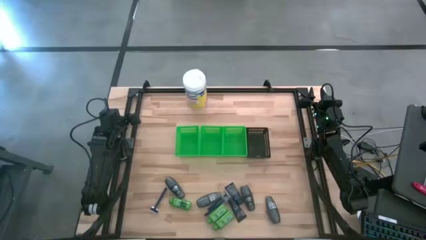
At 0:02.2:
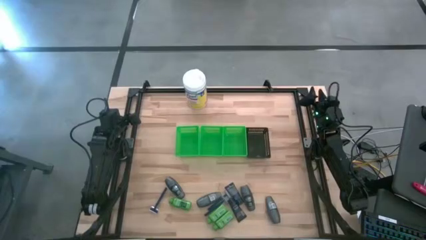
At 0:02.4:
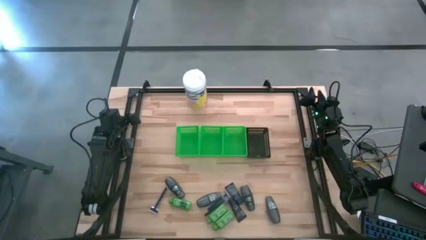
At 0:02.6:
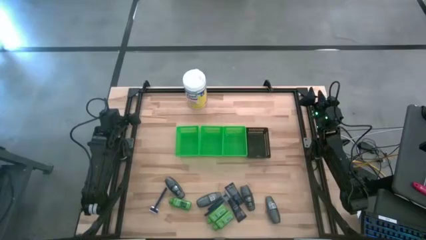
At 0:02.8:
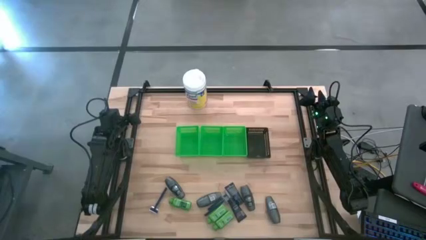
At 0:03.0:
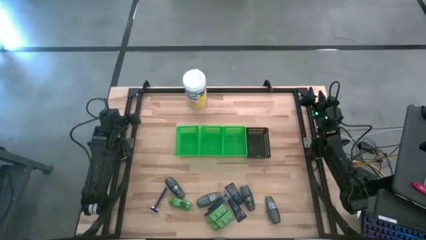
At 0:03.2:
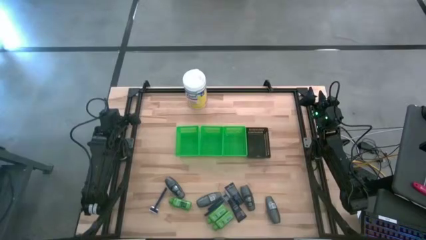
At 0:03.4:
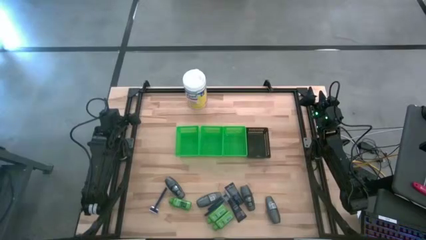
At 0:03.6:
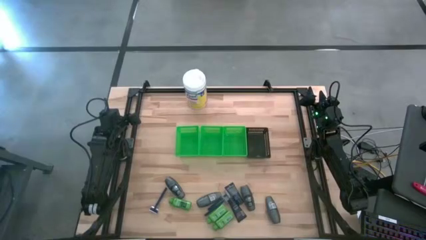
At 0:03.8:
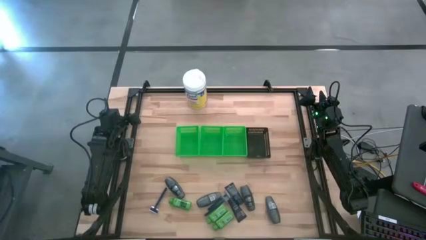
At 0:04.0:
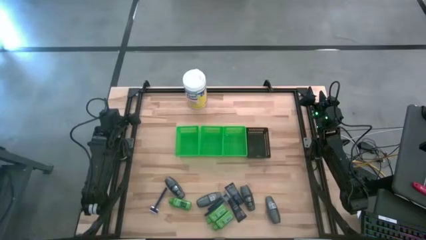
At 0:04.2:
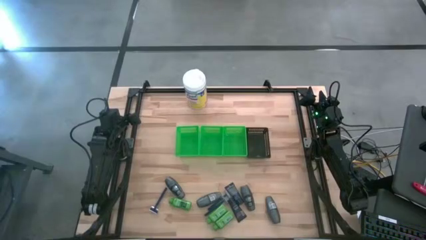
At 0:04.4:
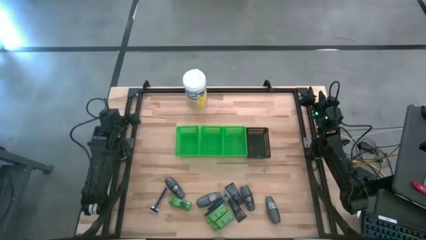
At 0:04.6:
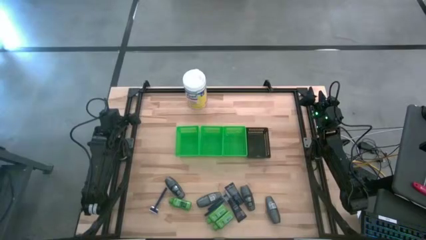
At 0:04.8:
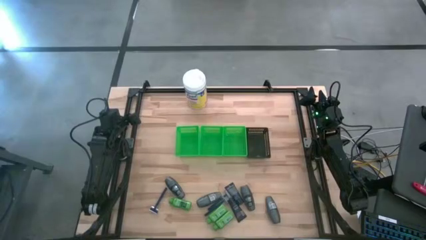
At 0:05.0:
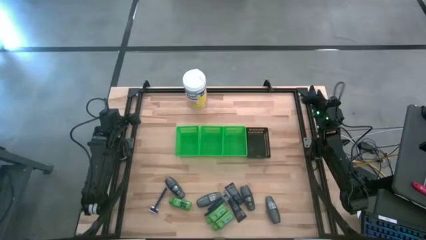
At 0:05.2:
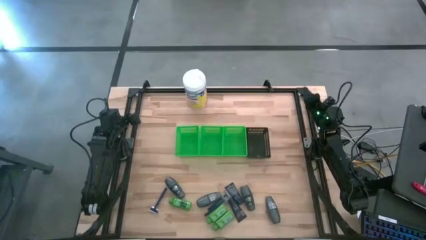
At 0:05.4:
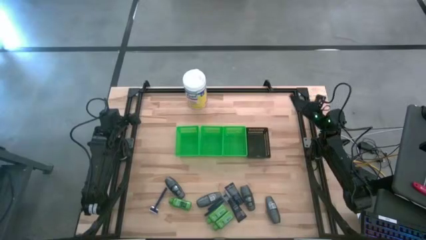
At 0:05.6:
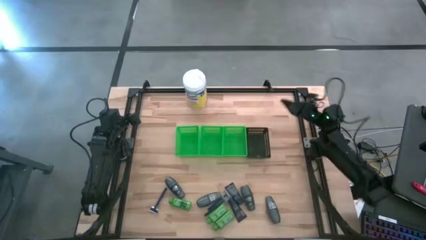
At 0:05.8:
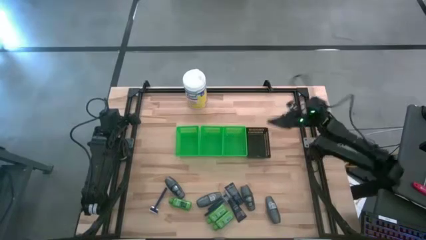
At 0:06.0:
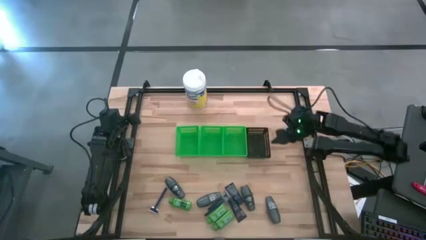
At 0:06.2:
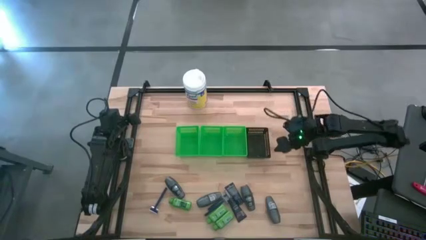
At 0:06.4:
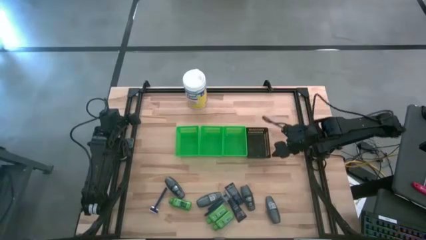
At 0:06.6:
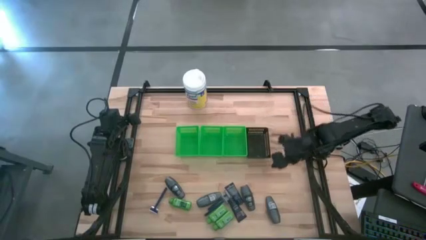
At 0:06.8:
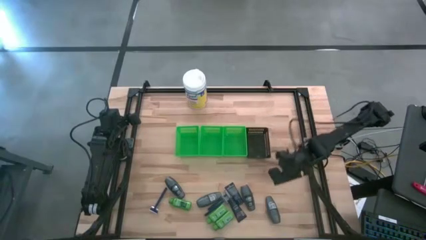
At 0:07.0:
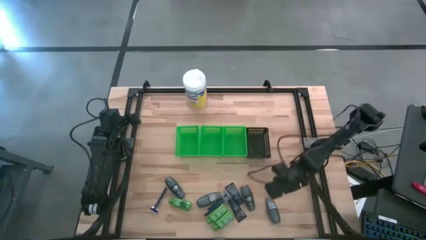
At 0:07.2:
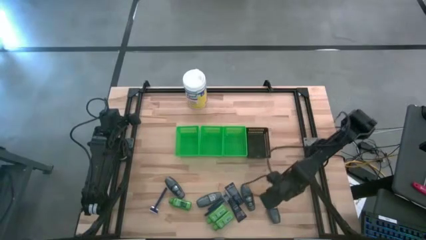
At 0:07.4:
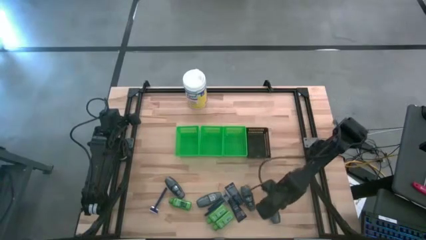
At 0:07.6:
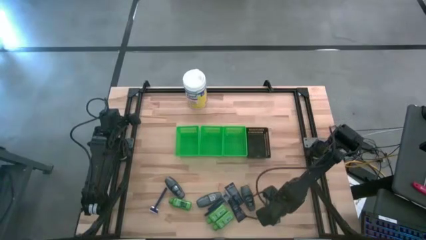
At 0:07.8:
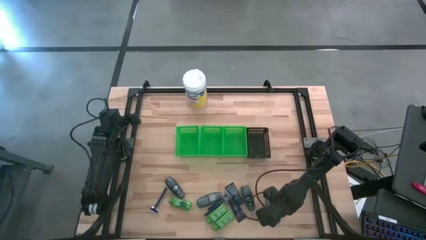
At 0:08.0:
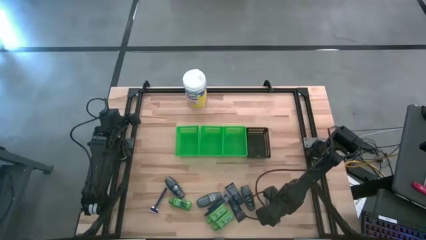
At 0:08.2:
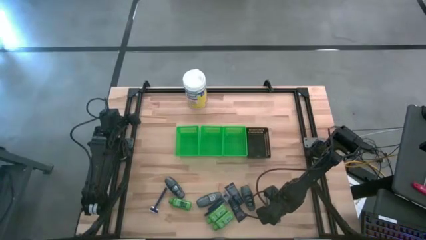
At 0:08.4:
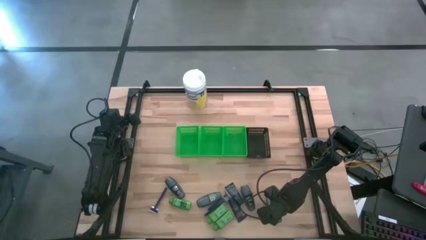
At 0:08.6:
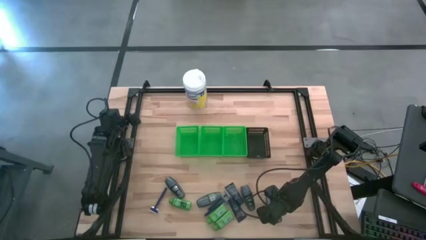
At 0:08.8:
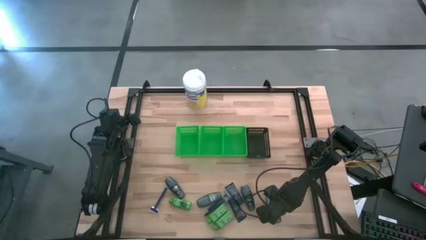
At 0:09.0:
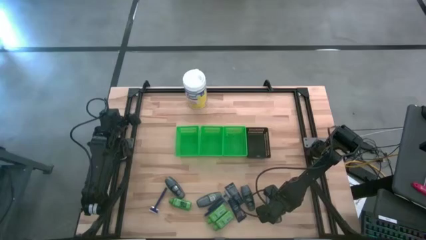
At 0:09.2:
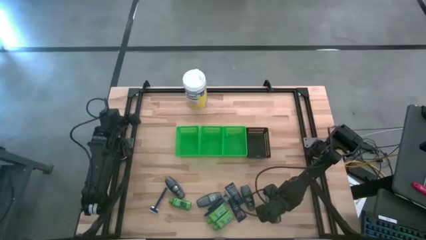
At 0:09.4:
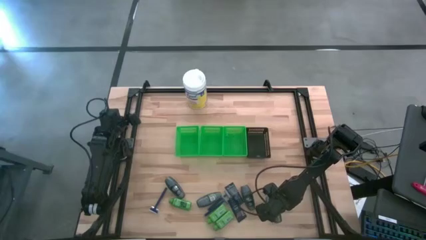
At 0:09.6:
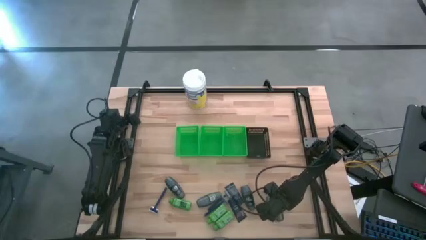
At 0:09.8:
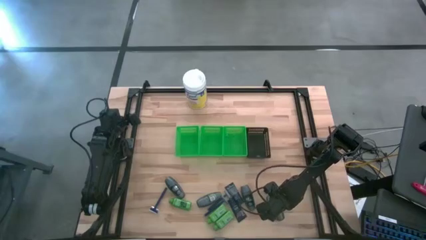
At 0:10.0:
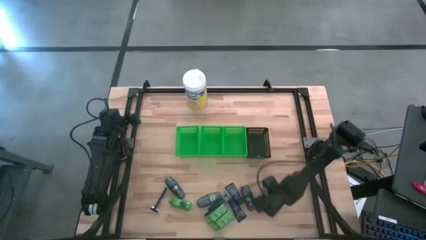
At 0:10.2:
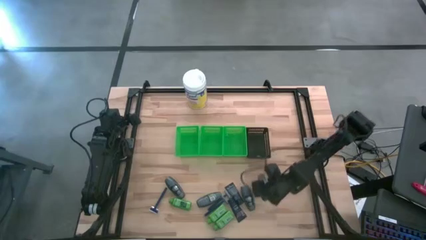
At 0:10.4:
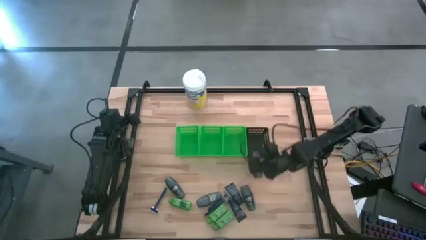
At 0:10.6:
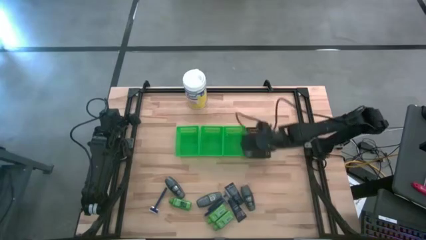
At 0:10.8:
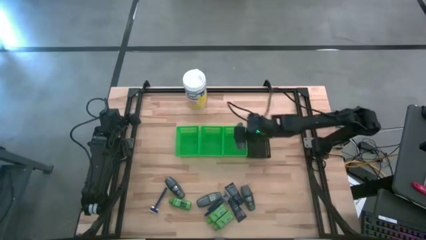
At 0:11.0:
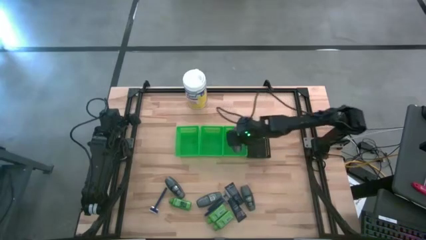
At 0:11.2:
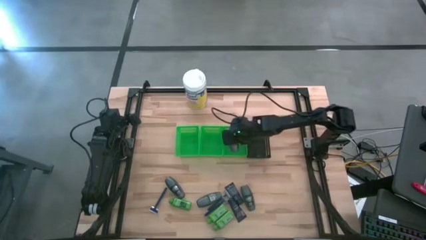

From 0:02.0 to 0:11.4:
Task: Pick & Place Travel size toiletries
Put the gray roller bottle into the right green bin

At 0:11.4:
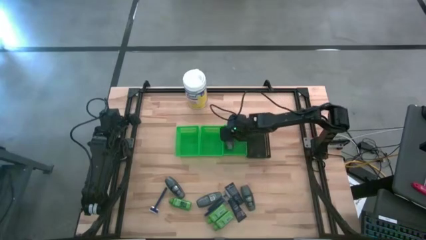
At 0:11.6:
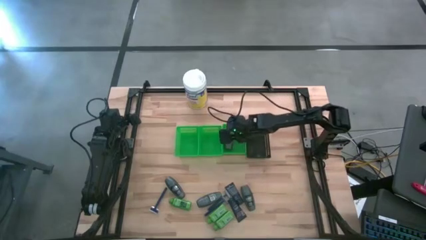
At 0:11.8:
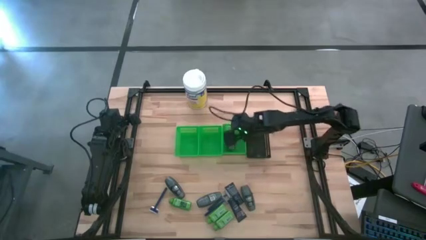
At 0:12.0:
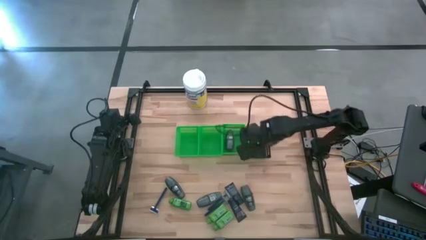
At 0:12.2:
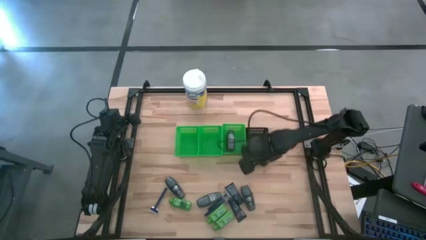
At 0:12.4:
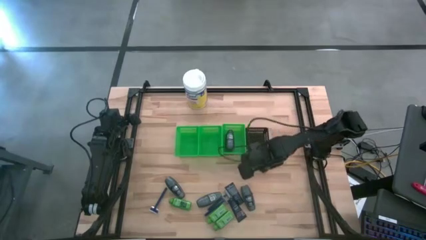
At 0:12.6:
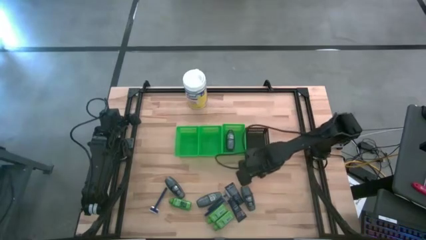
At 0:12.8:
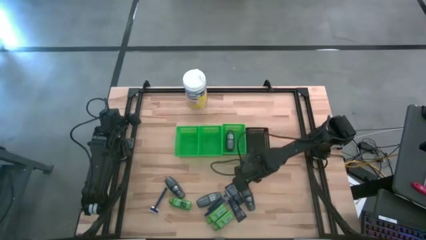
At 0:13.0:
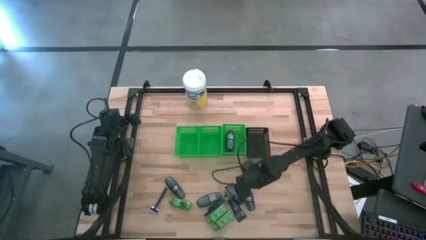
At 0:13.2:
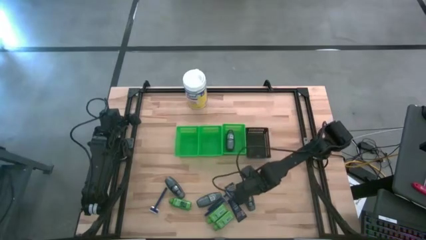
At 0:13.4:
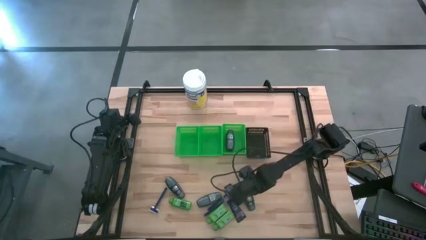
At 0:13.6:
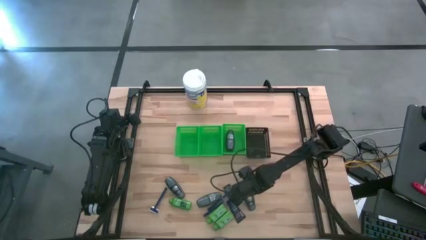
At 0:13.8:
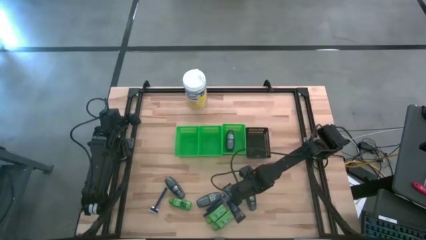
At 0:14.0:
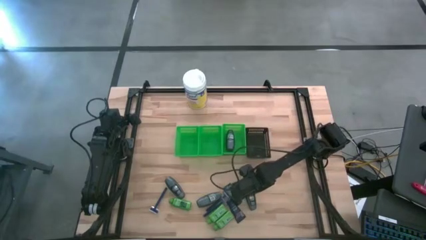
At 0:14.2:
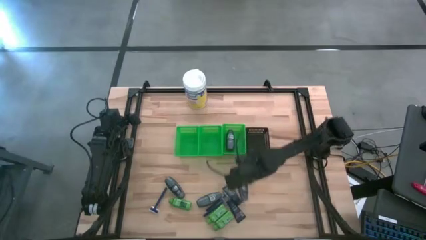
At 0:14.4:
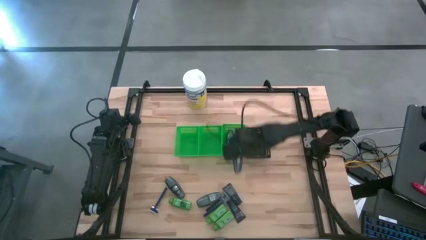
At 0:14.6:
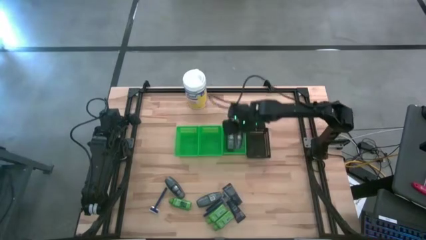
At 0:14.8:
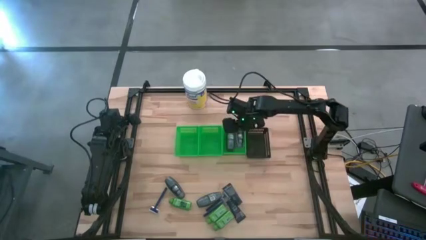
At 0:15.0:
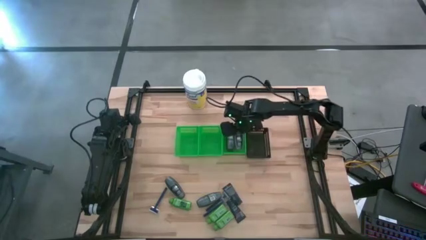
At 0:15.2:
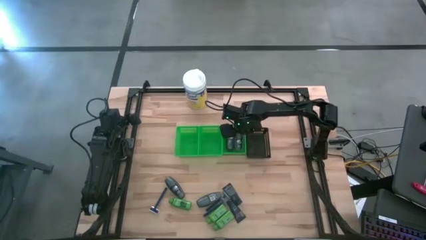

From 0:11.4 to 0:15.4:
Put the gray roller bottle into the right green bin

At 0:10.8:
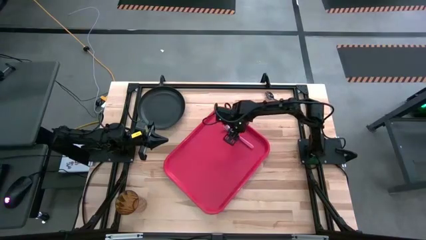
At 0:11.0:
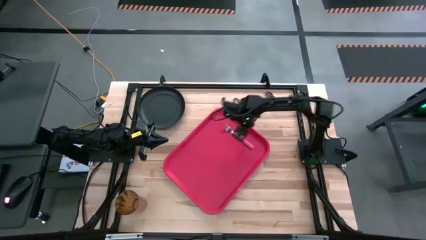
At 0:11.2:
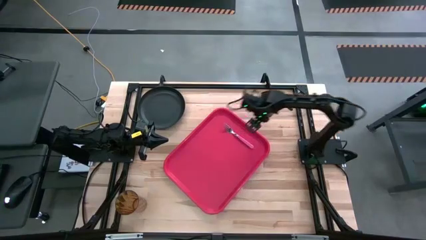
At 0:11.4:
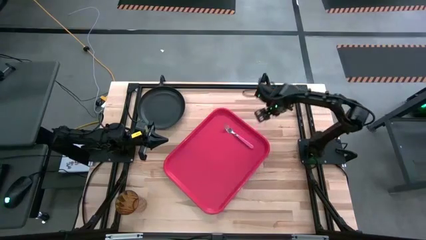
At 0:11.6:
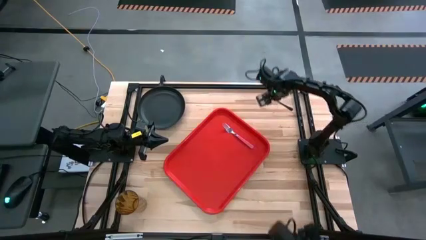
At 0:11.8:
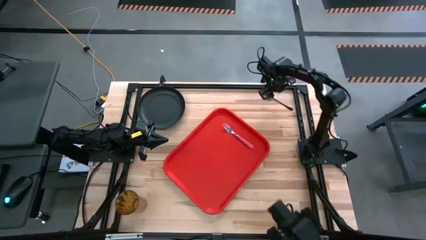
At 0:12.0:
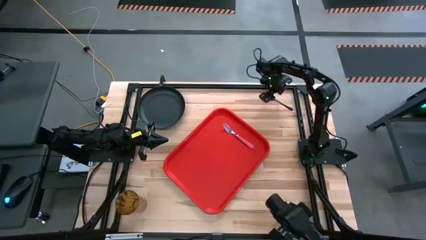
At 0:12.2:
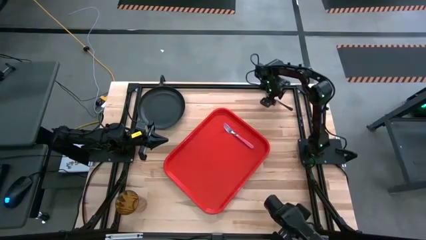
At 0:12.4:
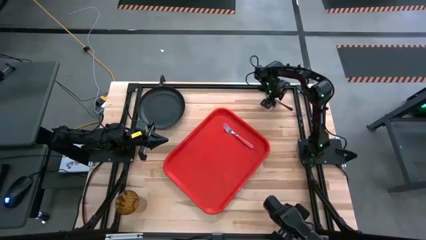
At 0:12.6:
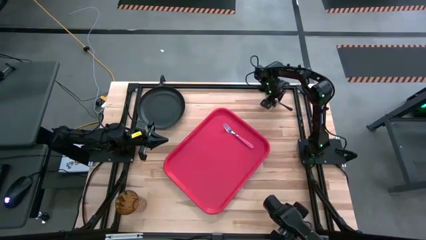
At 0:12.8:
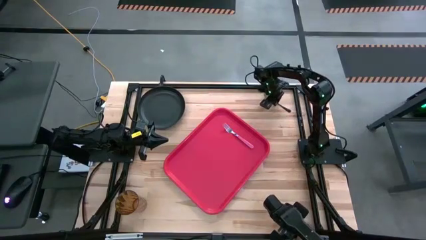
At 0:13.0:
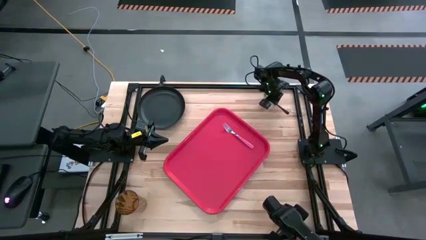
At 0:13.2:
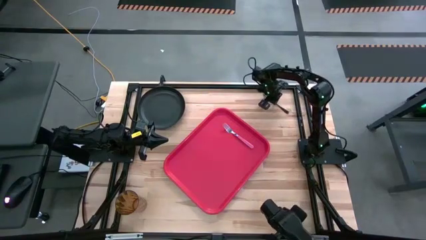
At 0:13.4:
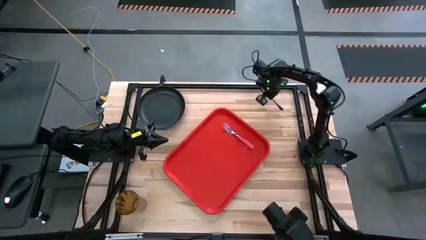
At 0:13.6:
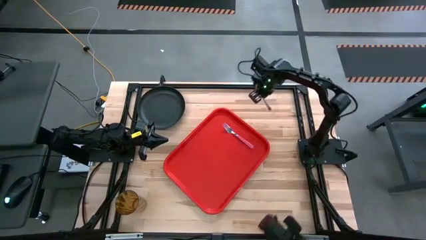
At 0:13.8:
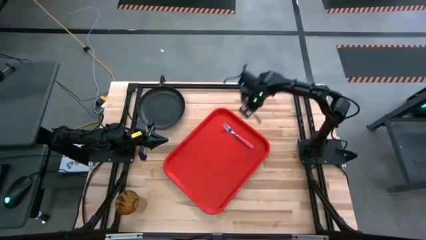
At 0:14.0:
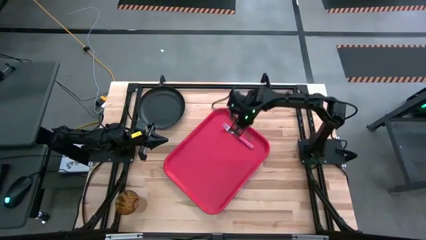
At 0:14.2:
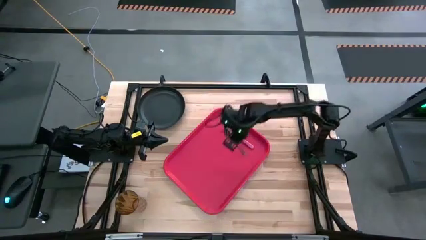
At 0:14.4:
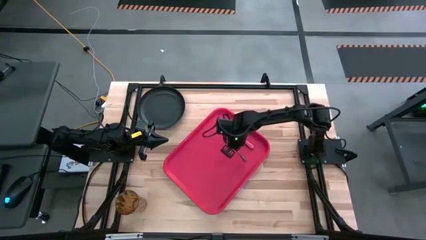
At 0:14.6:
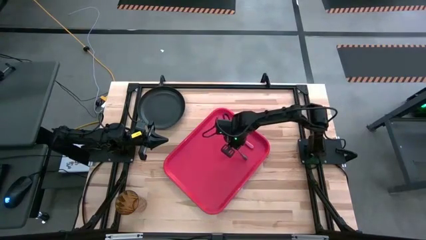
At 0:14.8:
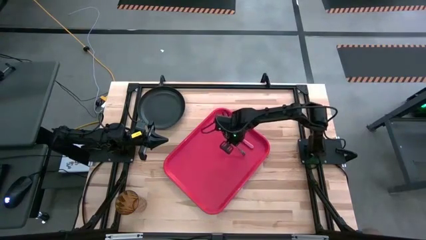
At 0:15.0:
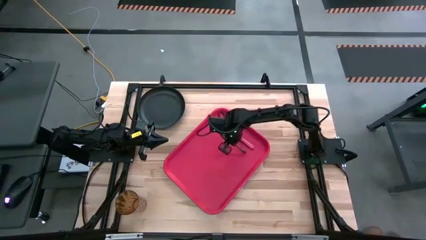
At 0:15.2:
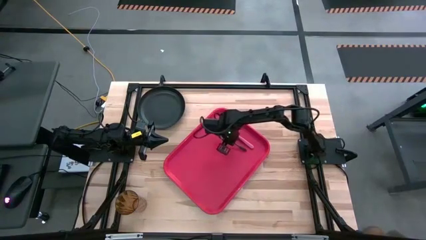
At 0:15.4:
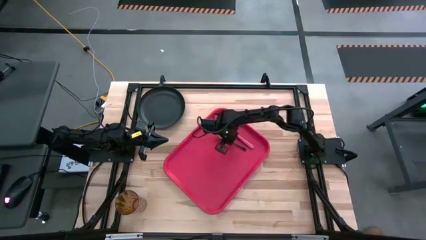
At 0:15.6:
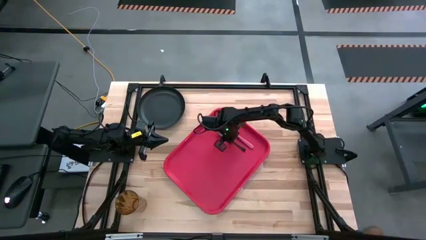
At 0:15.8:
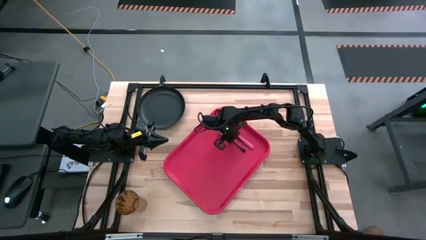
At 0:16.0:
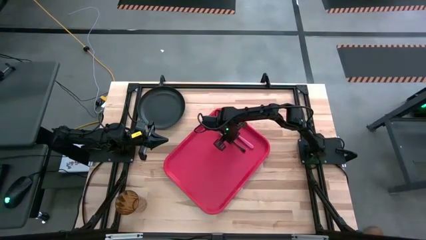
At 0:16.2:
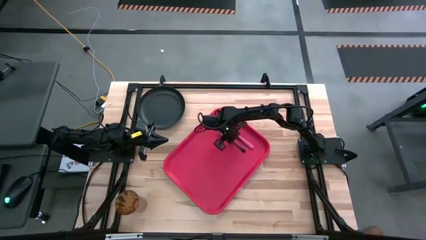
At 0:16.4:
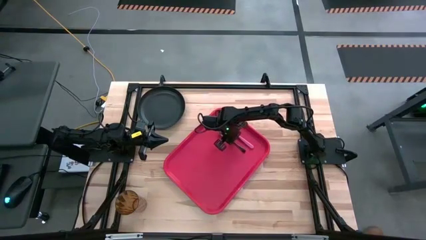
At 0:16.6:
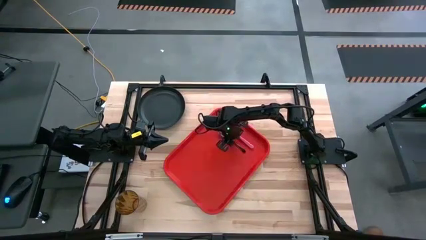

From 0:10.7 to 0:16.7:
Task: Pick and place plate/cup/fork/spoon on tray
Put the black spoon beside the pink fork on the serving tray
